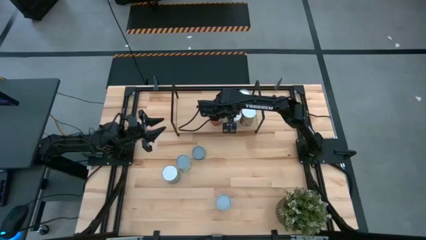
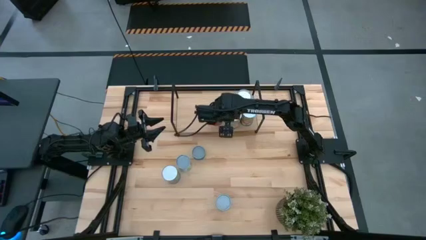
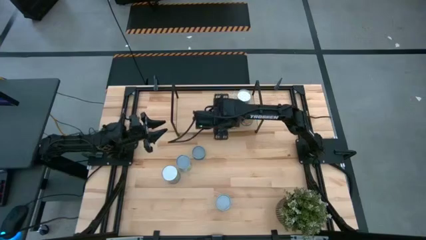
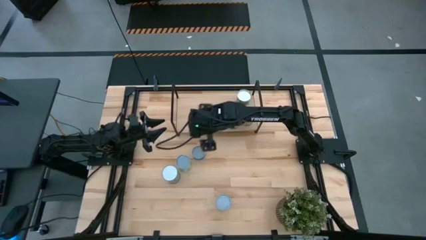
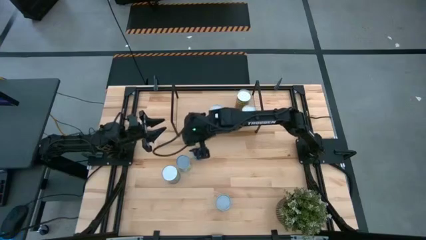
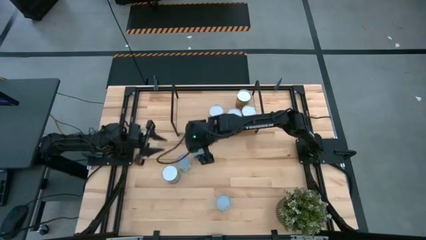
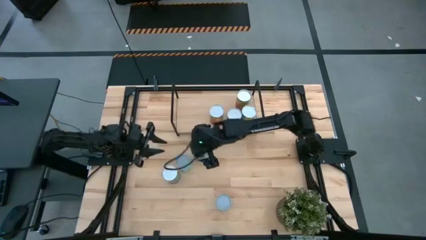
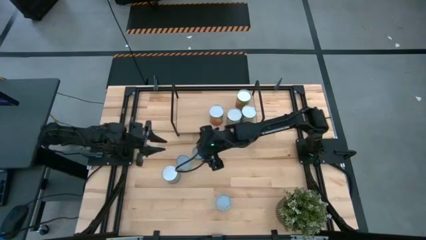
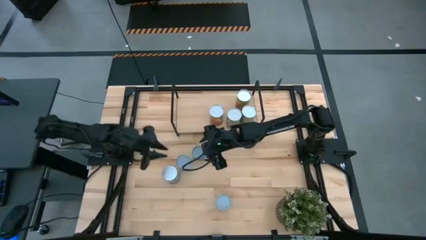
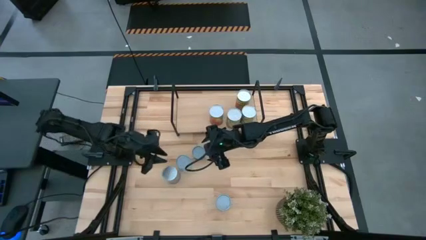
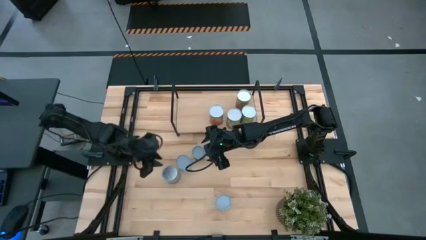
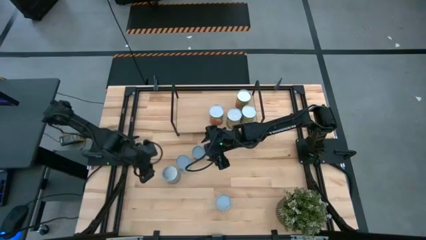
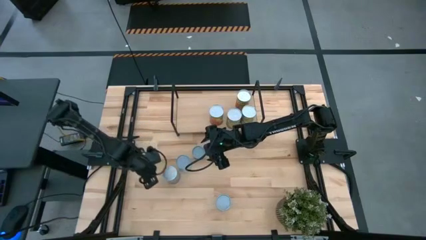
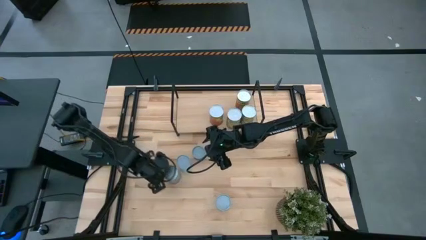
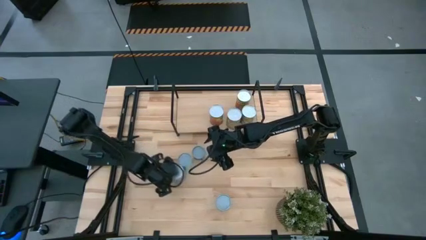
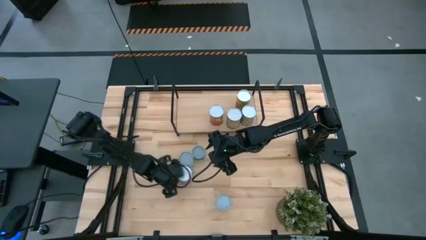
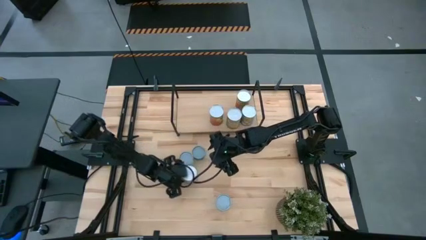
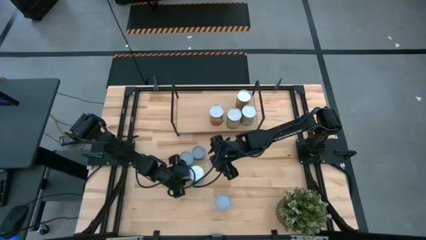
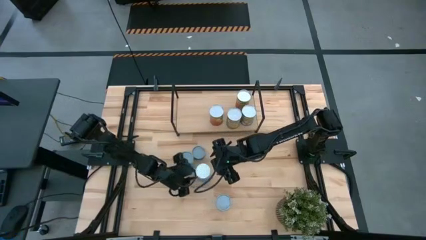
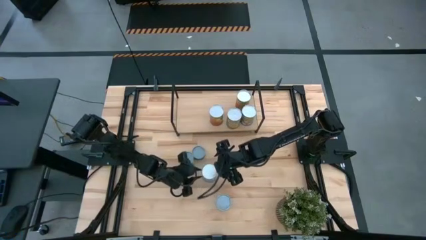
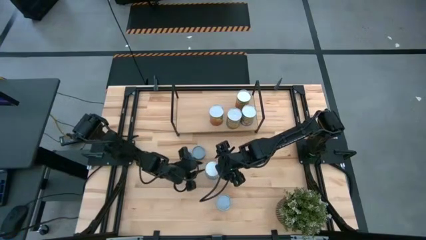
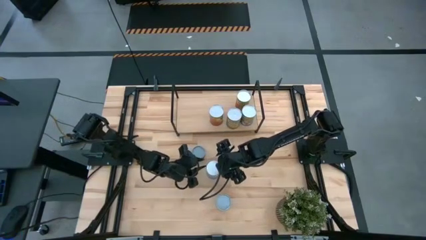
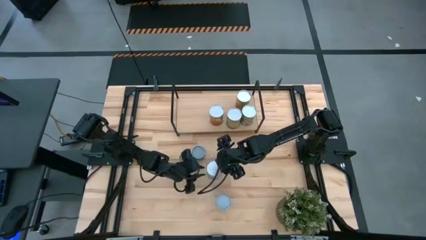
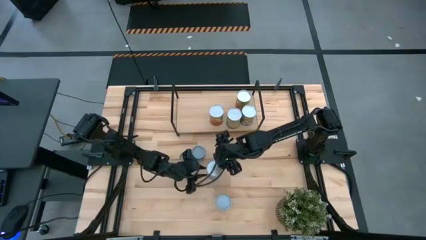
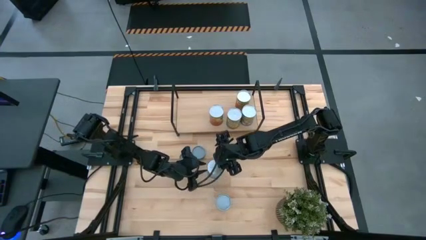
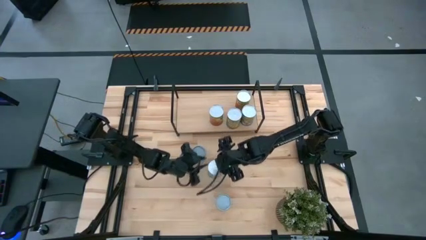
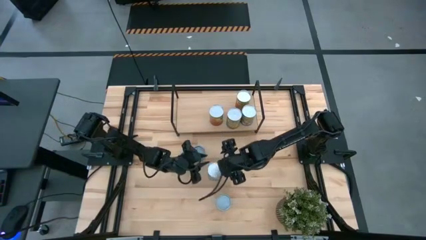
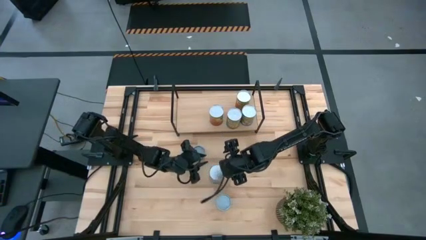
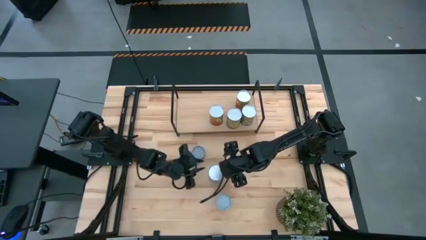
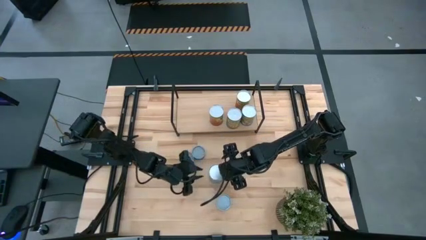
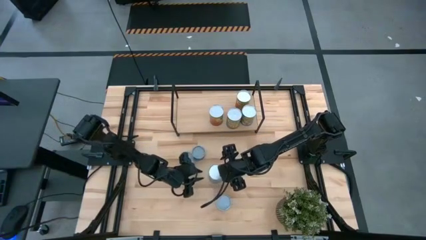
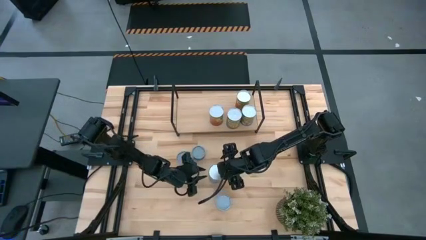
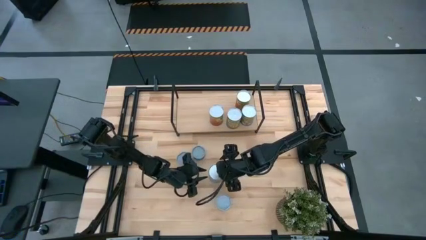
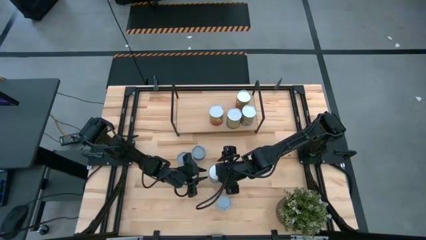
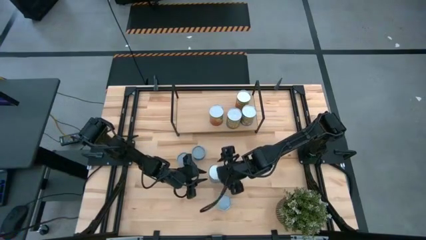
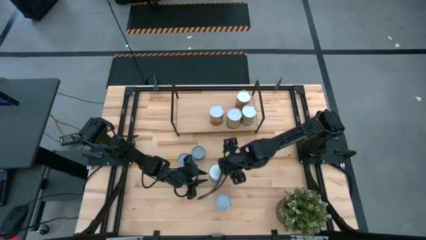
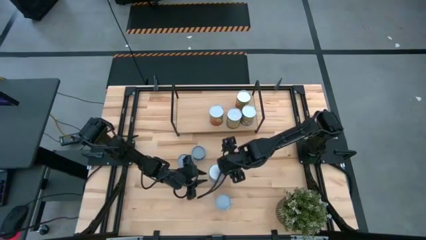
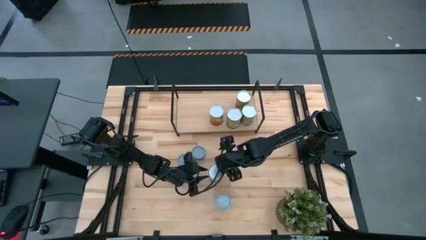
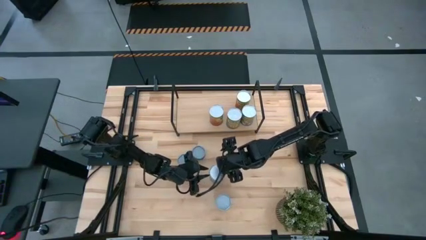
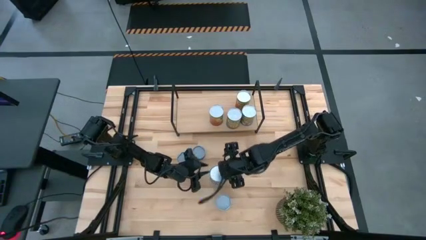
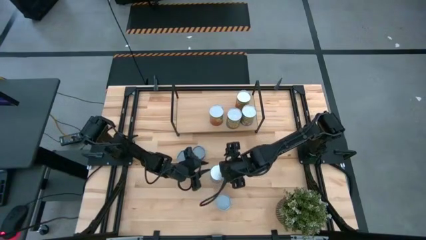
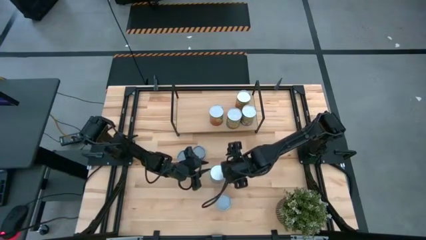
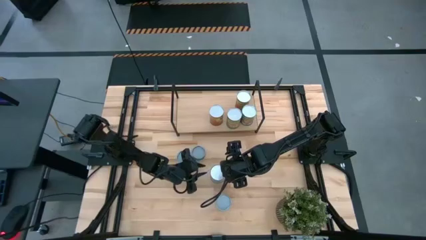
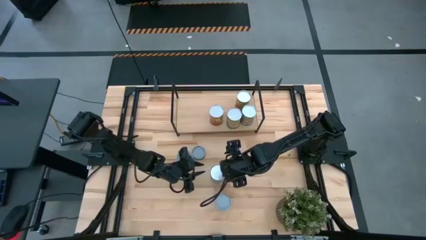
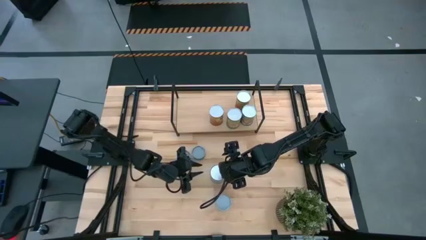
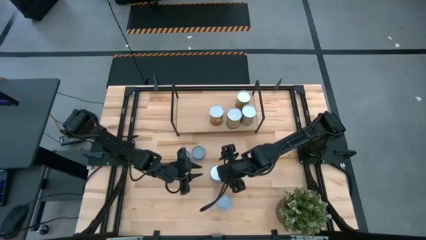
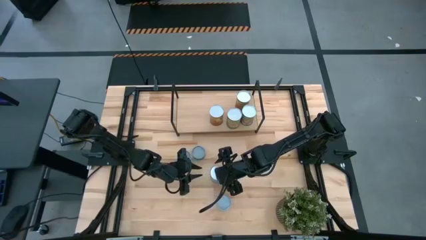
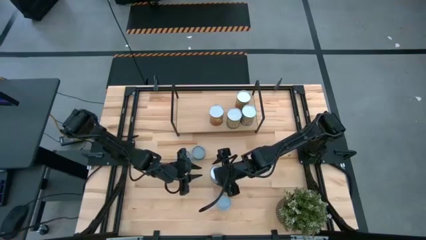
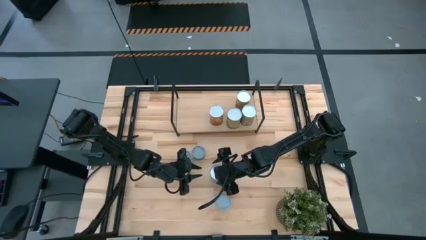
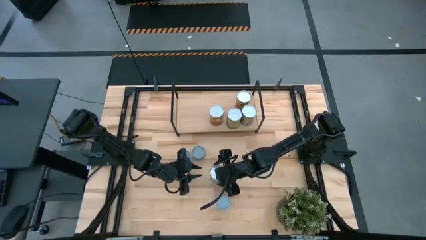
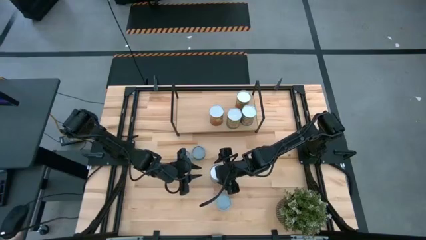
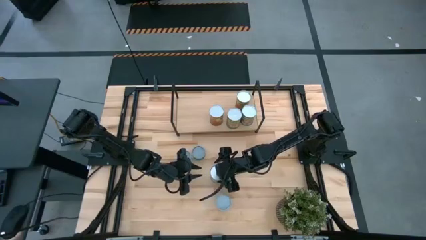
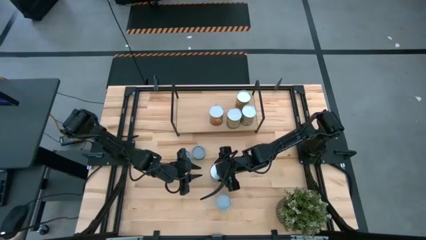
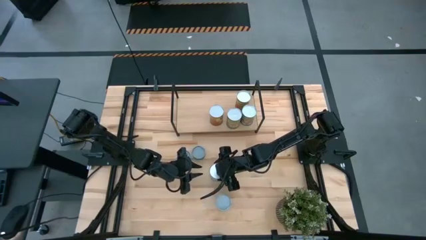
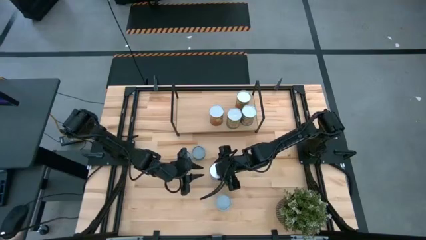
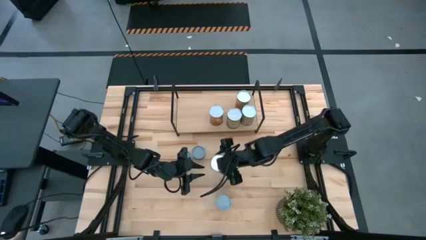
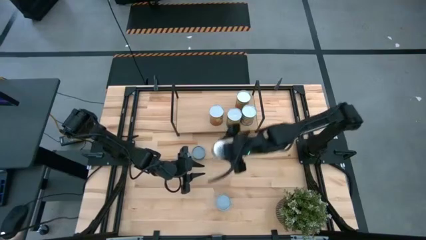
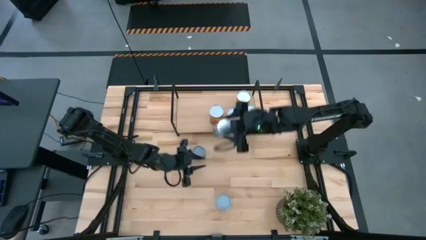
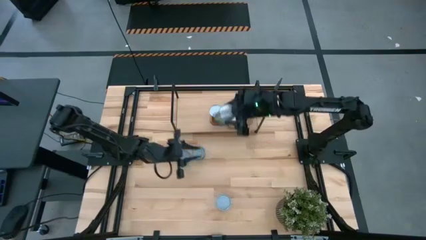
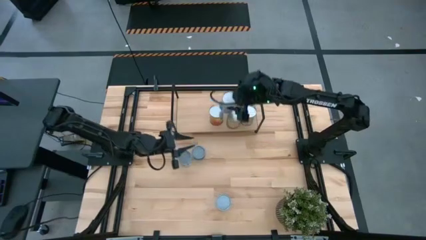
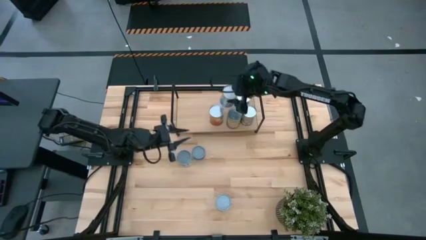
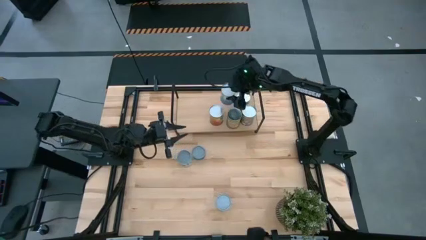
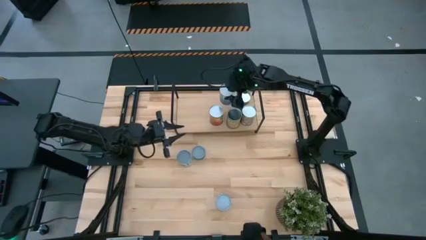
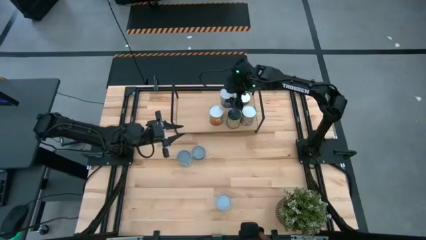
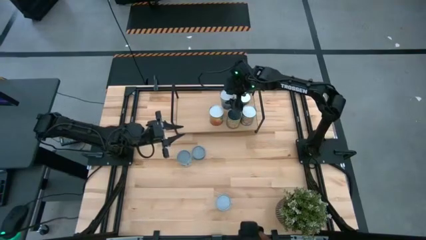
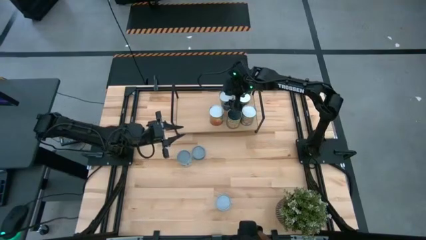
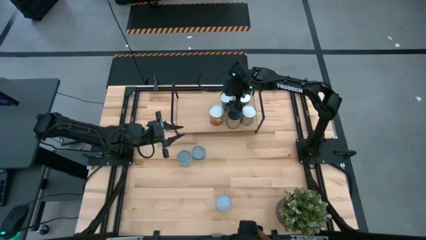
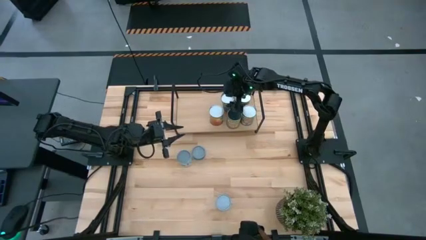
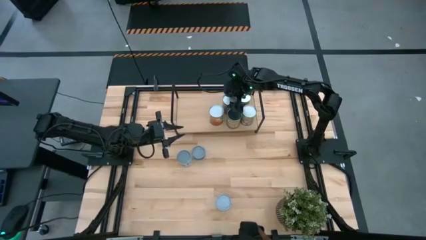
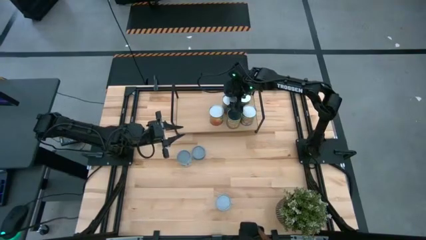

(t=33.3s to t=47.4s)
Task: Pick and place cans onto a shelf
Put the canned cherries on the shelf
